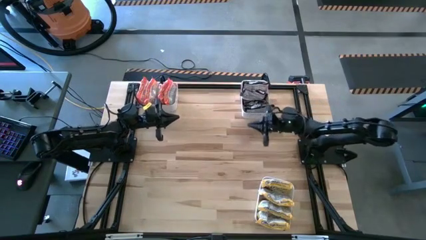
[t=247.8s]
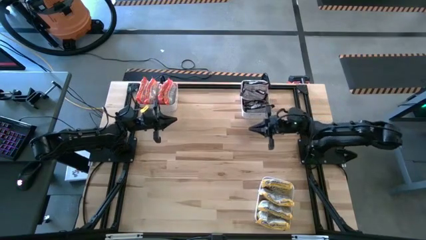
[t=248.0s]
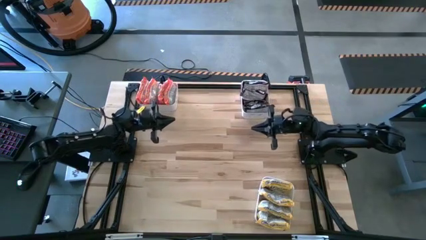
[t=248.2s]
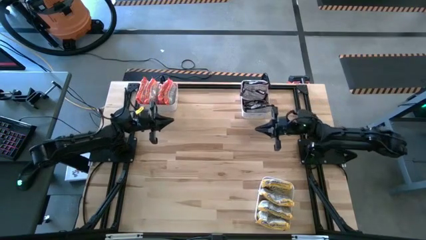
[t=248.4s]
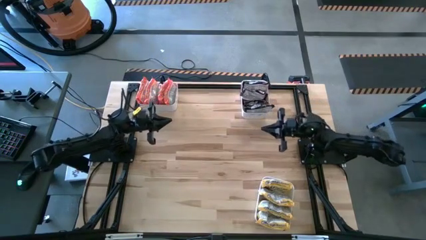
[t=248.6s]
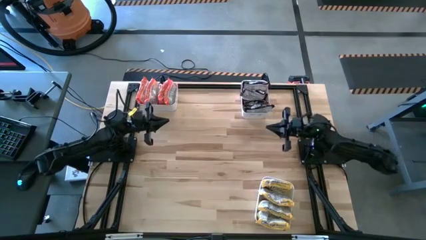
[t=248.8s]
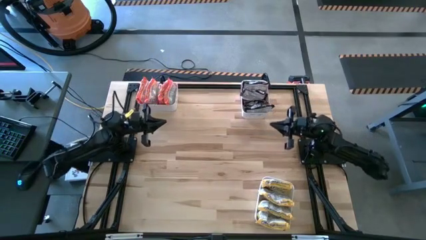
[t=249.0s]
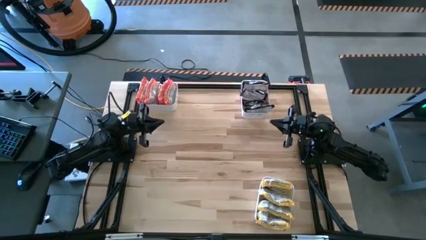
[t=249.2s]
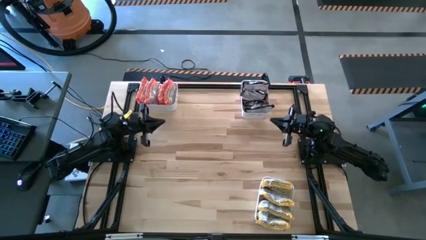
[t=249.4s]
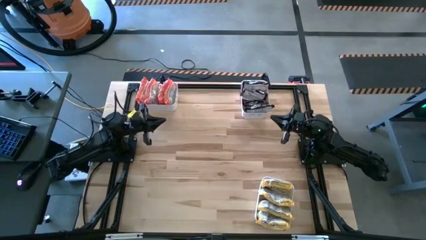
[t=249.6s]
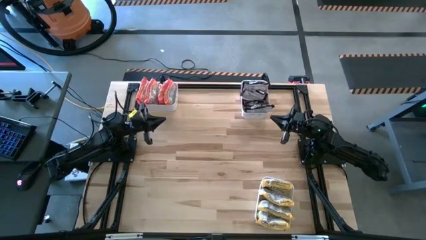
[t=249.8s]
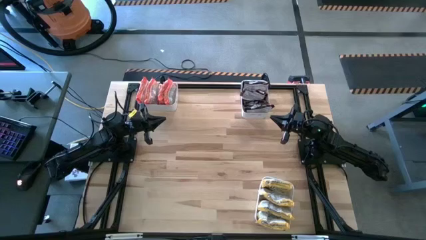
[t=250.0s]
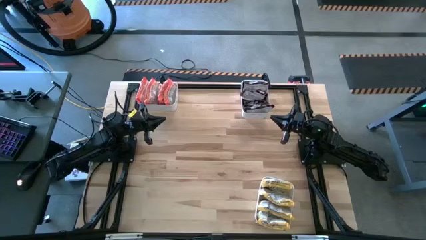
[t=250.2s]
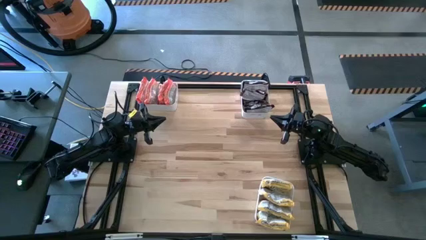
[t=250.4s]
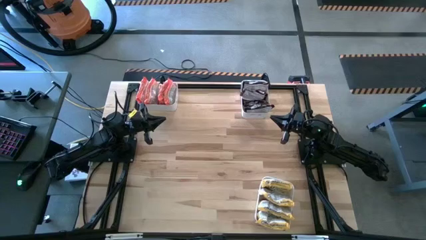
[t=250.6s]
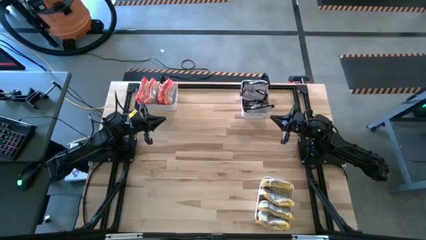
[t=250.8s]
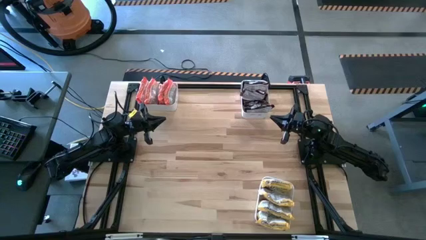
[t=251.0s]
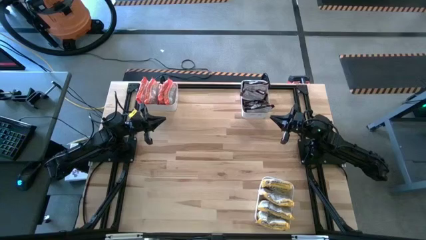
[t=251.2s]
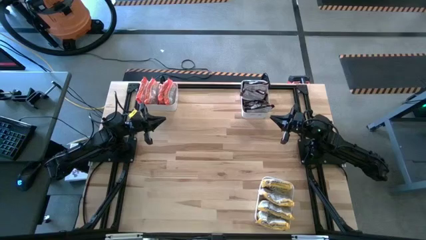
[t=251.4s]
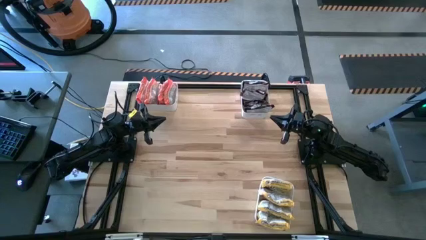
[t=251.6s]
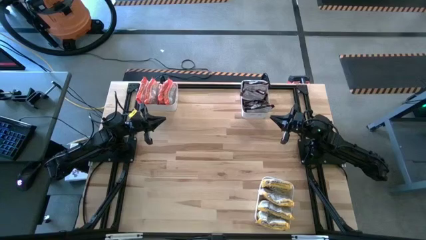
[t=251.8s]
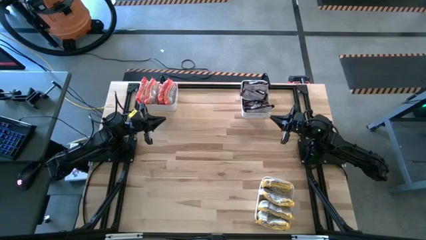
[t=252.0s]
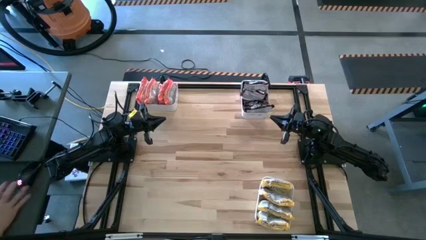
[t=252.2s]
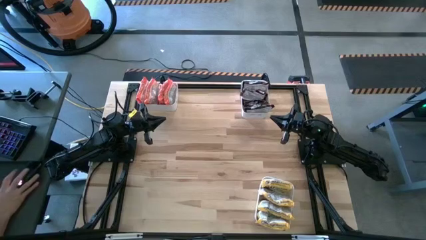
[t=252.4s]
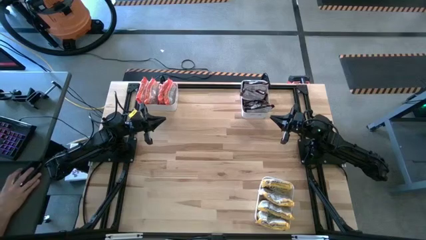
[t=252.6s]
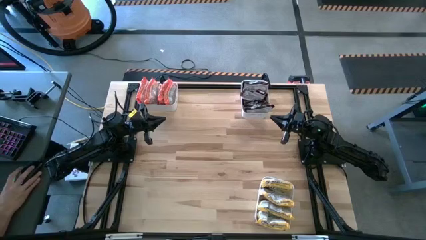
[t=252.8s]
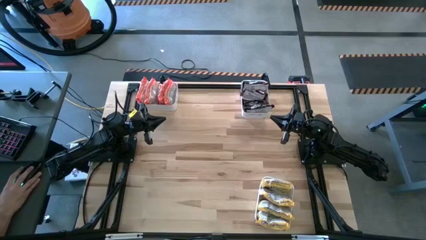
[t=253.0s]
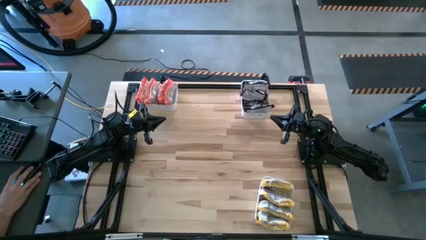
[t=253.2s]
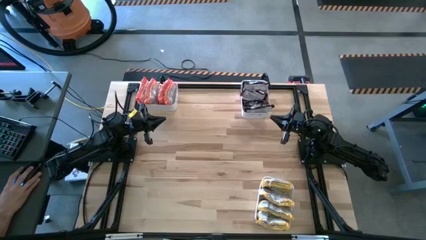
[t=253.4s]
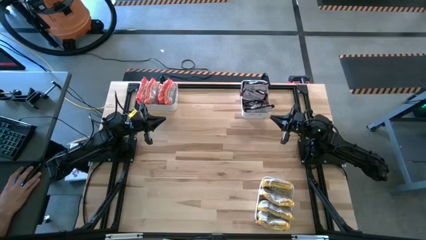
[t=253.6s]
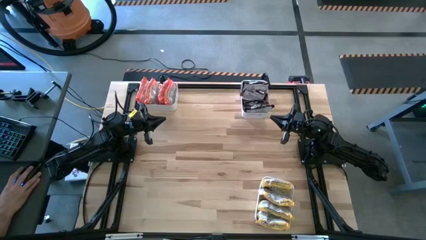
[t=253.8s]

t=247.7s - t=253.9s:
Task: Sort Maruchan noodles
Return to Home Position

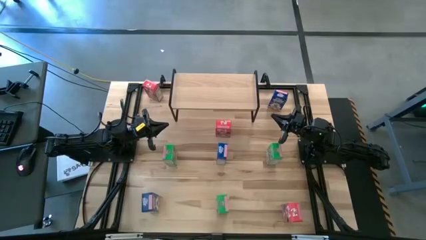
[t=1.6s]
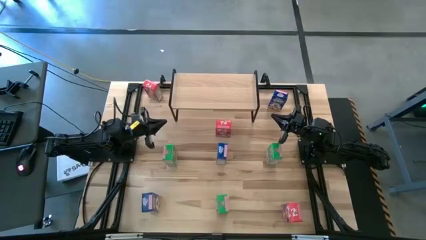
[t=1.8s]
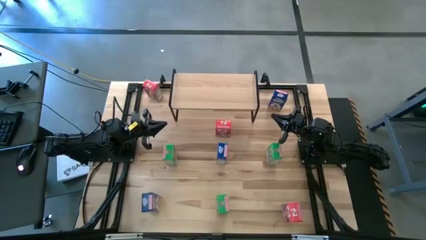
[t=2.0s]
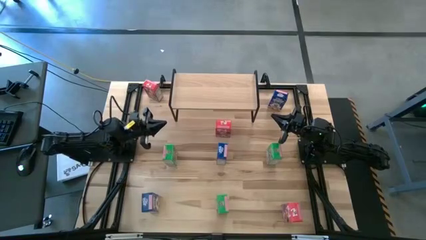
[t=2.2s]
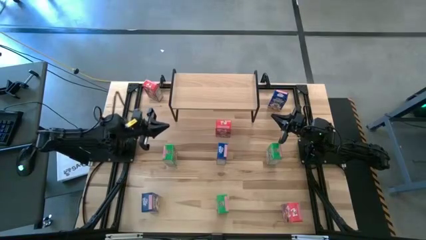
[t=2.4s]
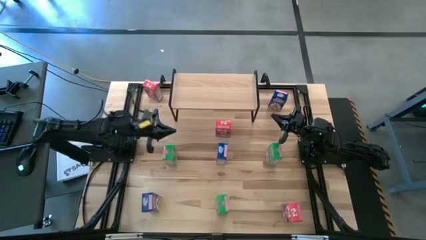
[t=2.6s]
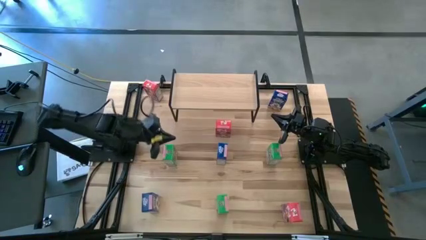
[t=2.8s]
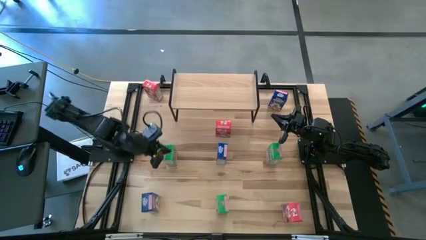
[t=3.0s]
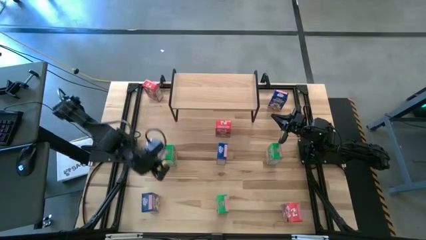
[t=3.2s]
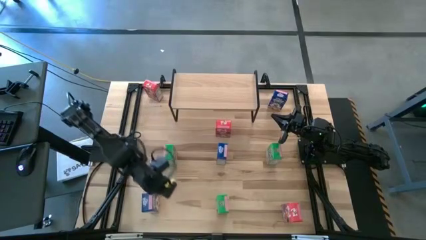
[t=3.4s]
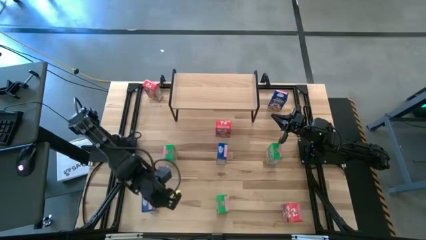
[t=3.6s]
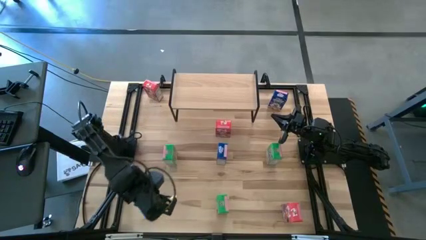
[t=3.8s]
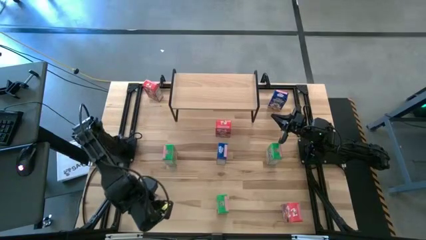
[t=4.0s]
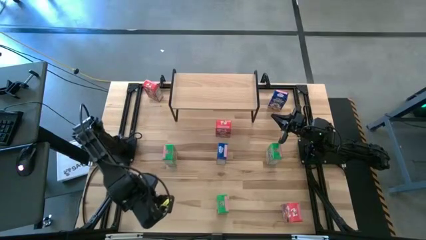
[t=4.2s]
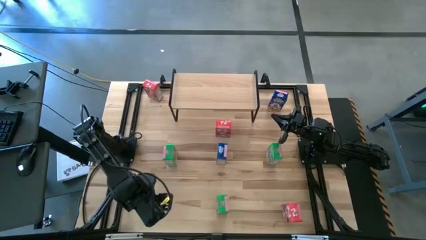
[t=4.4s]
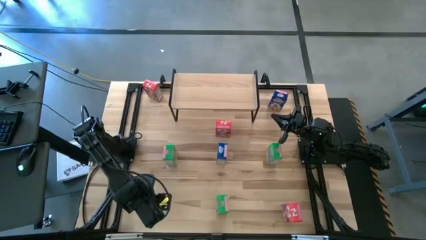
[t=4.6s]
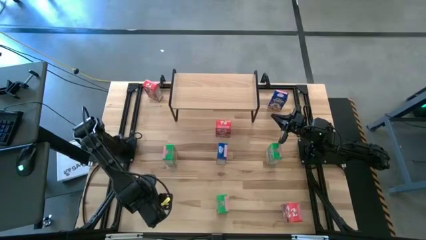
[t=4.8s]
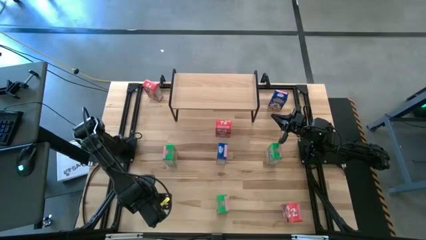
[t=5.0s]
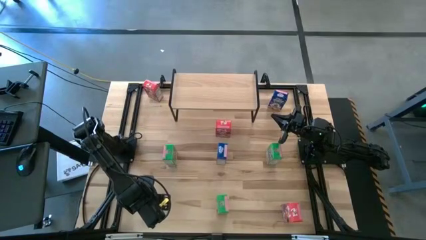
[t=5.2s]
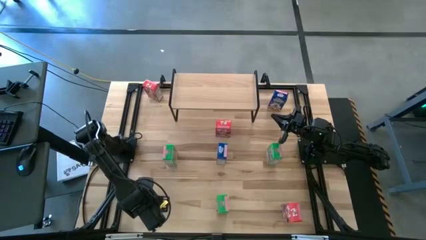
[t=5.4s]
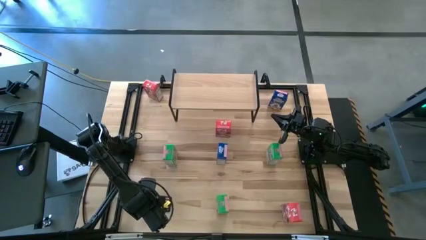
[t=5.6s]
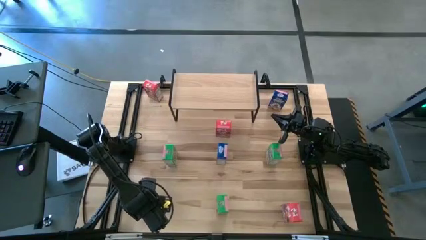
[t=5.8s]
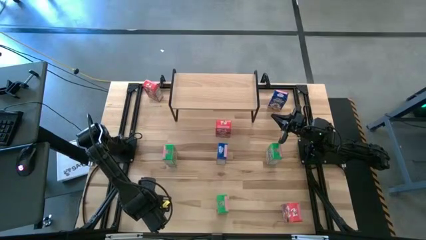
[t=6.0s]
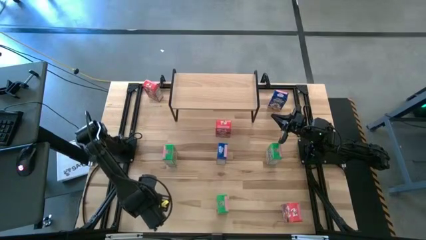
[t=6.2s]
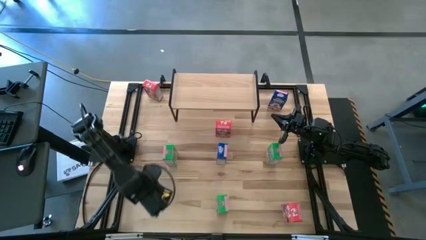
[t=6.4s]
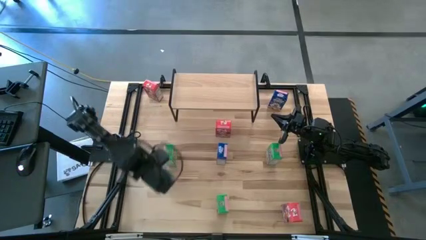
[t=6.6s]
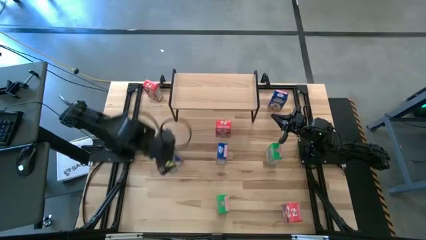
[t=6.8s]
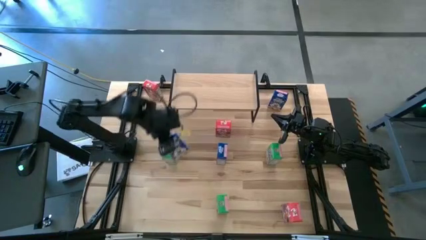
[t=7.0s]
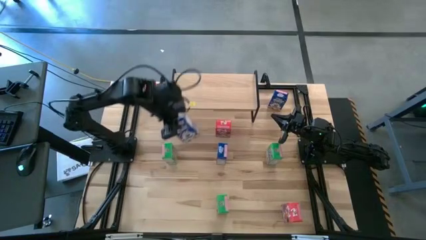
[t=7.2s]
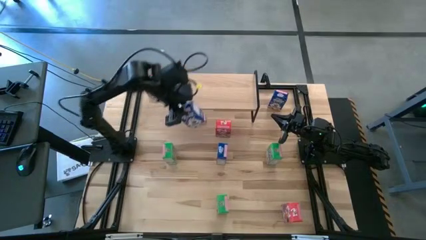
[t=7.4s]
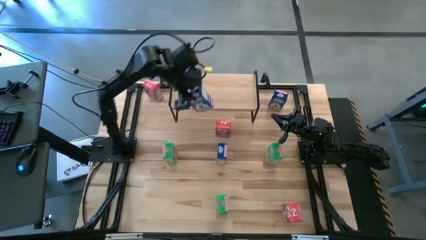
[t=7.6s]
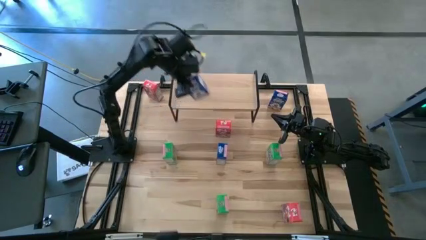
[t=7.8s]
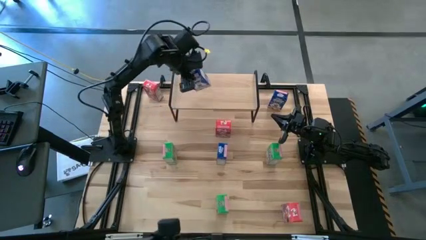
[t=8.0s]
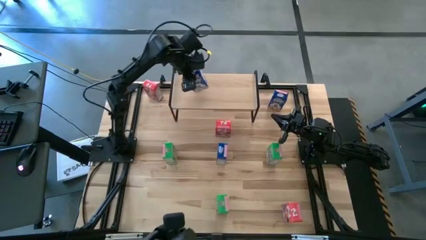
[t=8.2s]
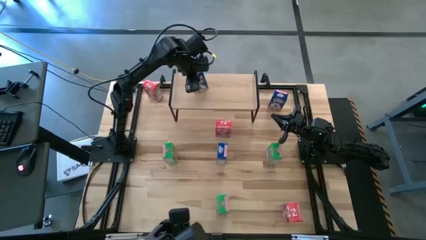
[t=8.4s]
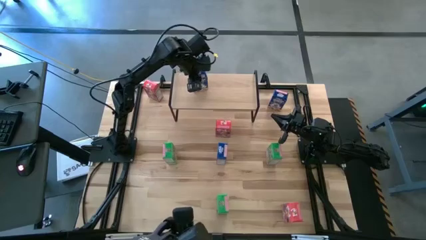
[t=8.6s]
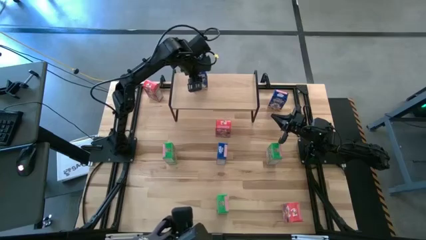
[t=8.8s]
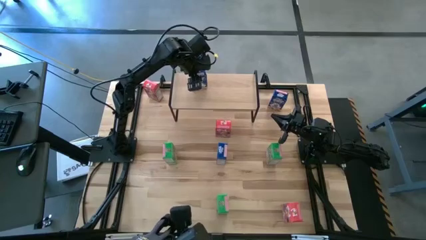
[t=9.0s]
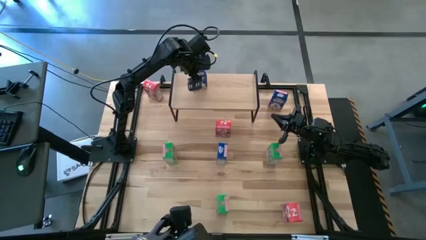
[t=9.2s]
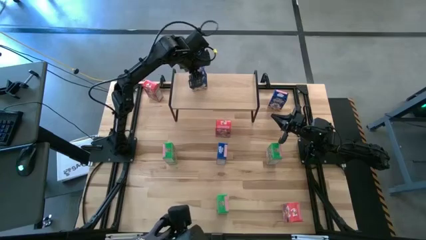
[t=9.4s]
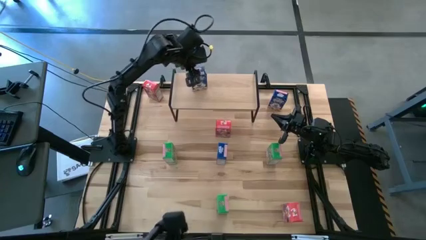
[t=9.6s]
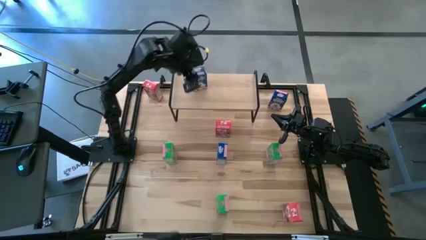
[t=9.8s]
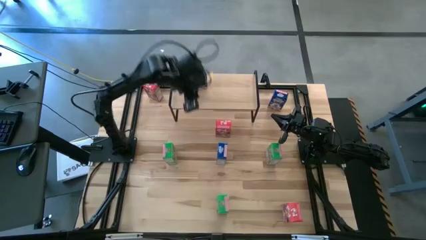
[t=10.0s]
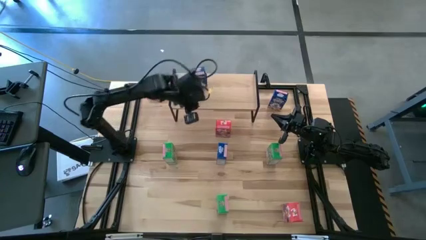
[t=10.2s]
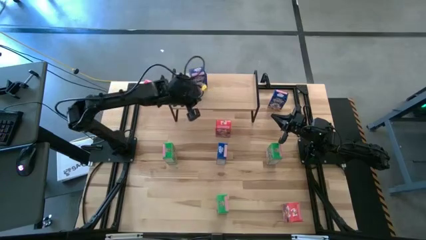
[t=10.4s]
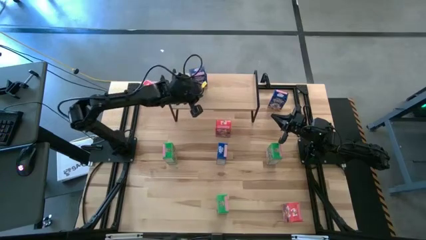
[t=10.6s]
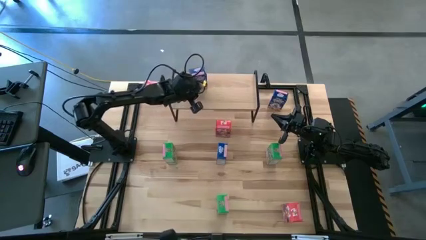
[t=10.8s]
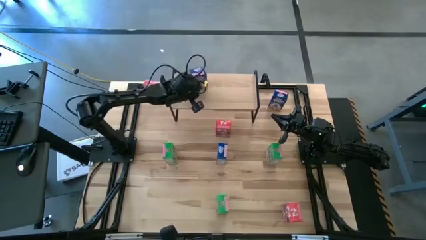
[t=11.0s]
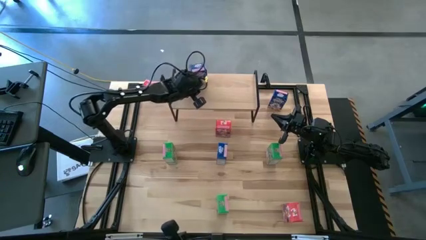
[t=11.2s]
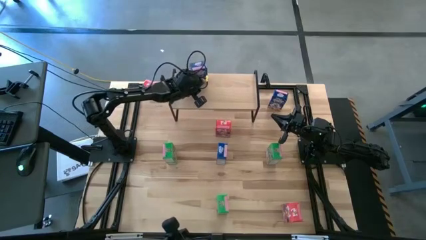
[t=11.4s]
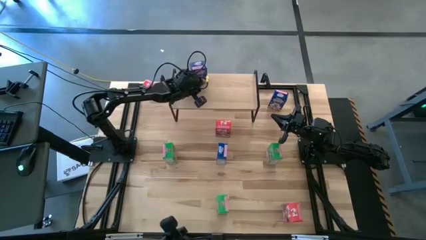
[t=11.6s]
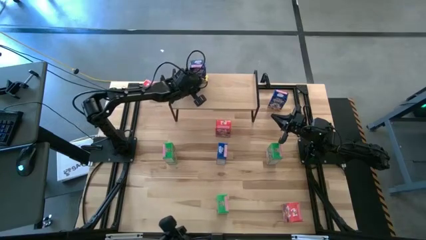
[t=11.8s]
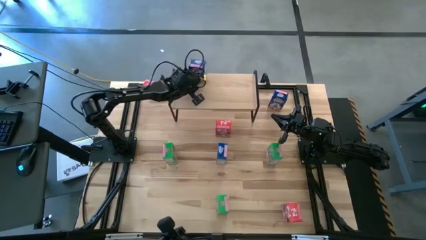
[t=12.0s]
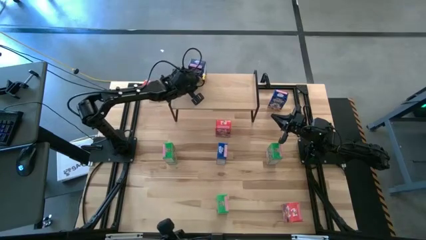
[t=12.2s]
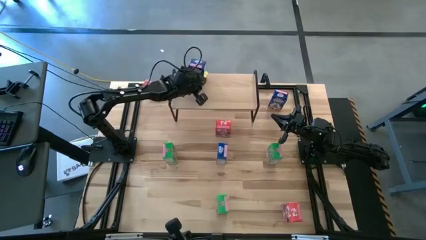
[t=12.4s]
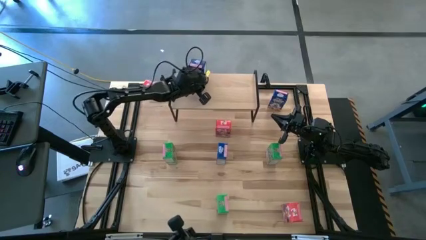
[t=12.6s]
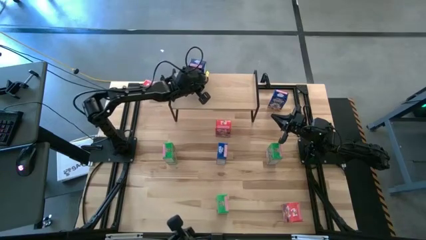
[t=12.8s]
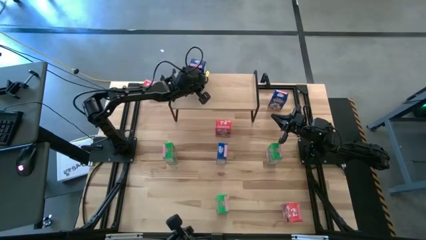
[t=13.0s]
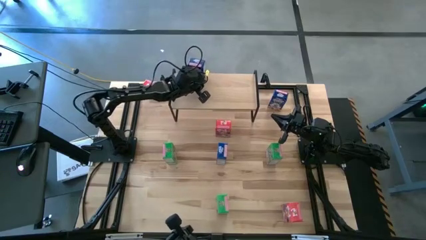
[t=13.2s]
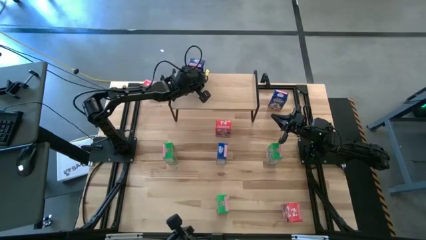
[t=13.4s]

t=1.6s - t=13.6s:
Task: Stack cereal on shelf
Put the bottom blue cereal box on the shelf
